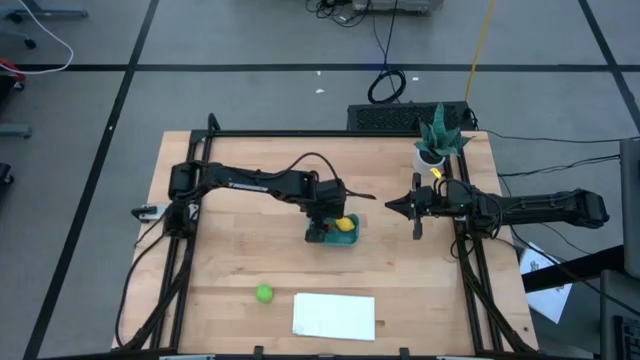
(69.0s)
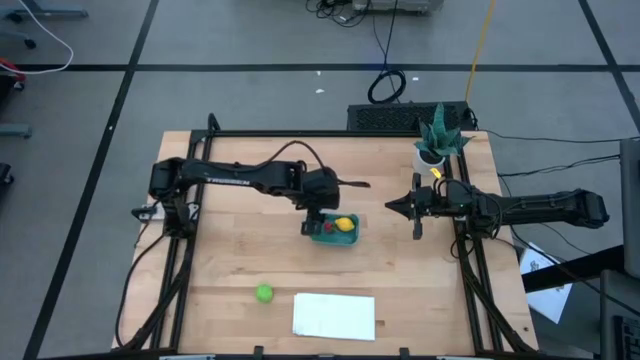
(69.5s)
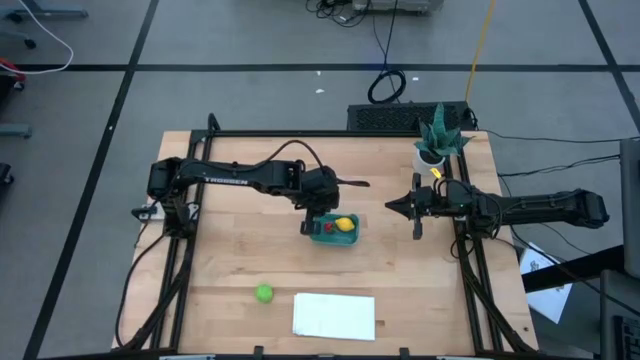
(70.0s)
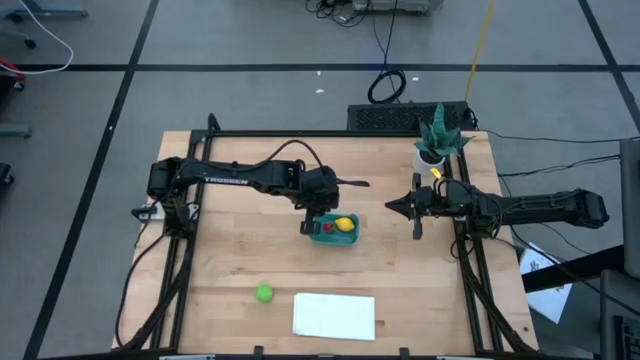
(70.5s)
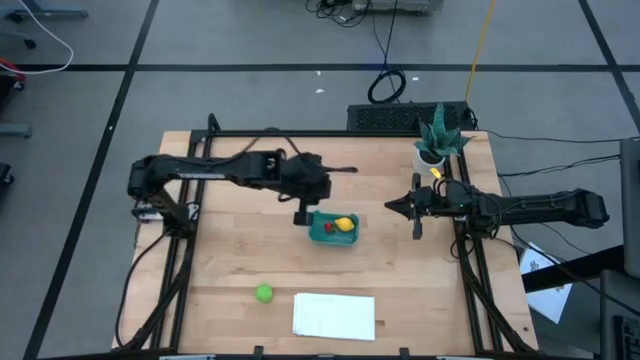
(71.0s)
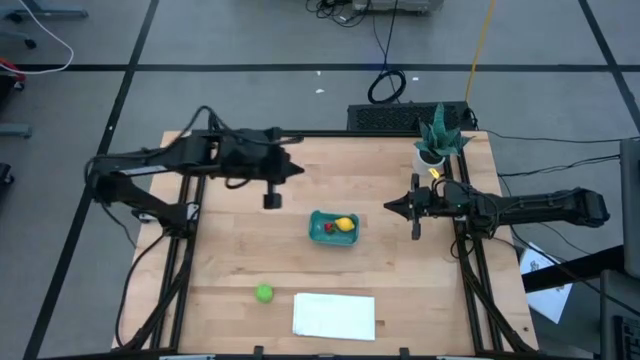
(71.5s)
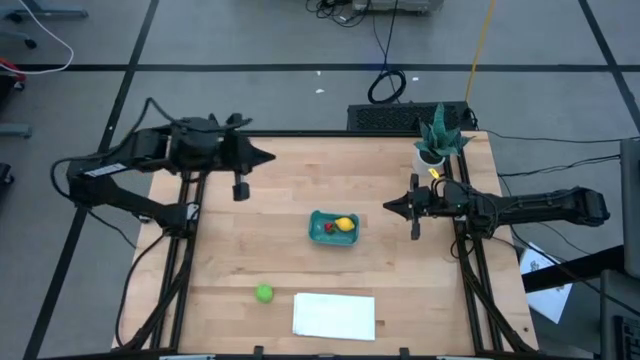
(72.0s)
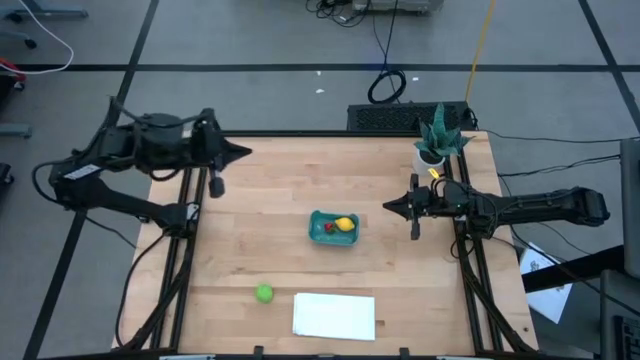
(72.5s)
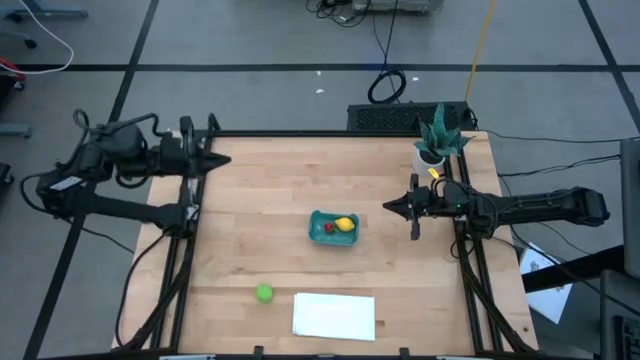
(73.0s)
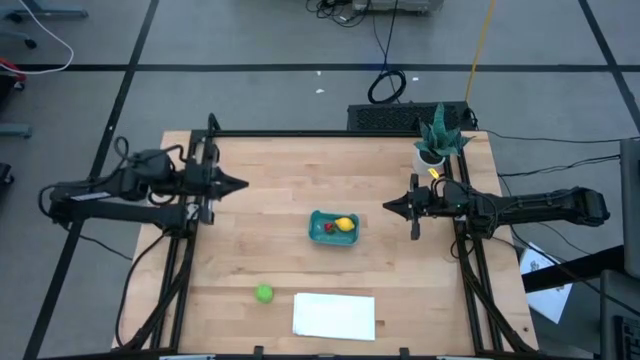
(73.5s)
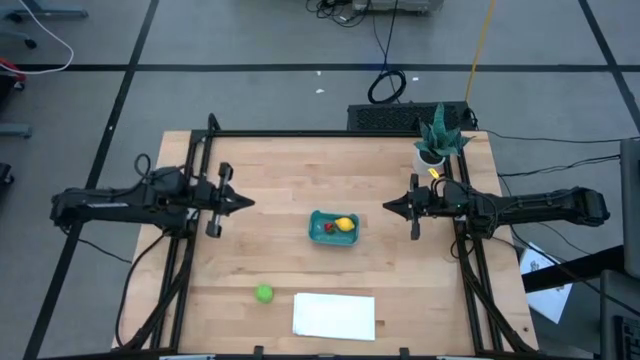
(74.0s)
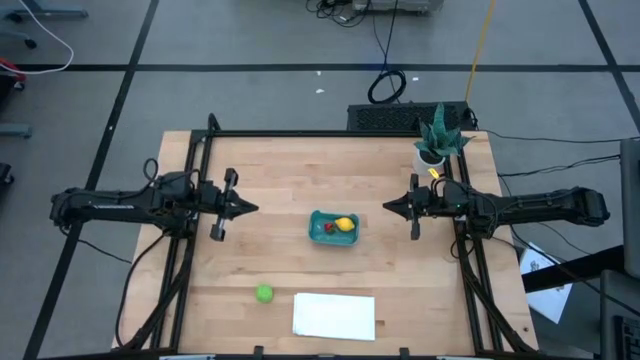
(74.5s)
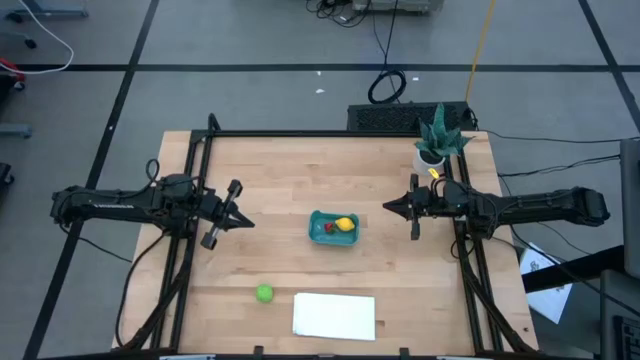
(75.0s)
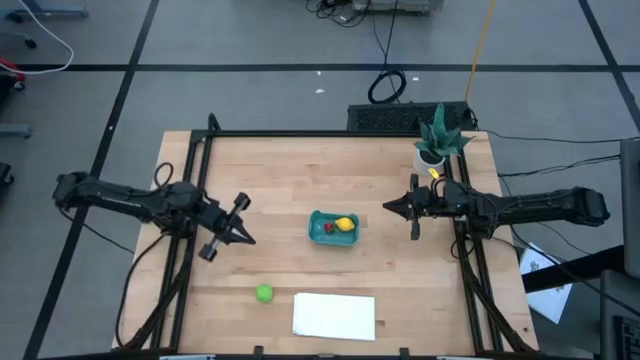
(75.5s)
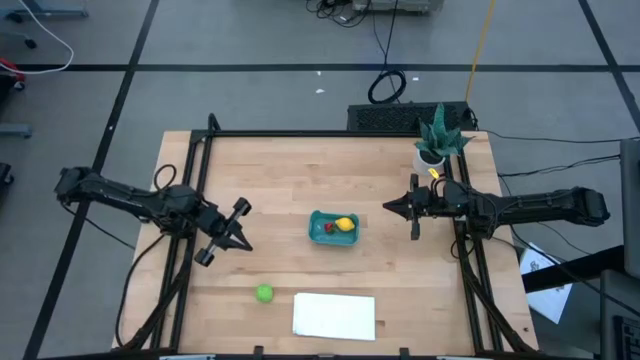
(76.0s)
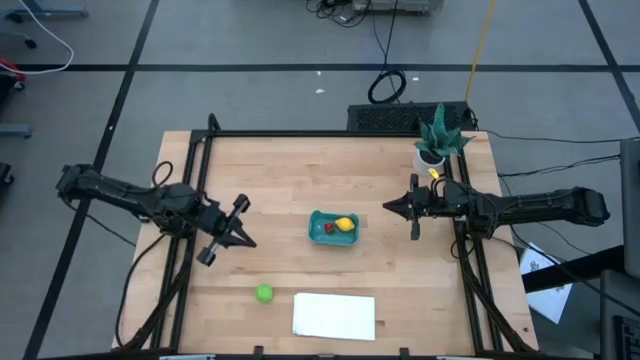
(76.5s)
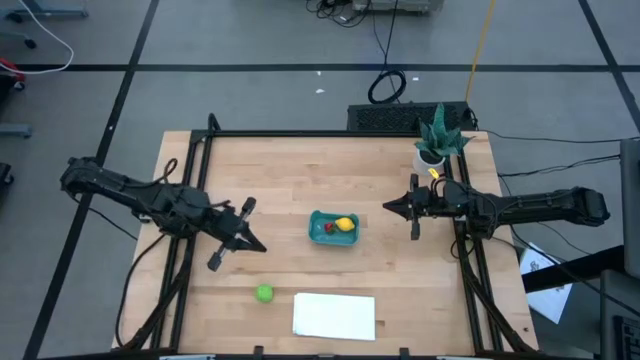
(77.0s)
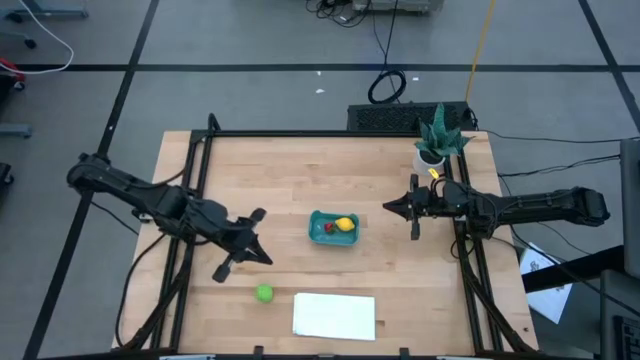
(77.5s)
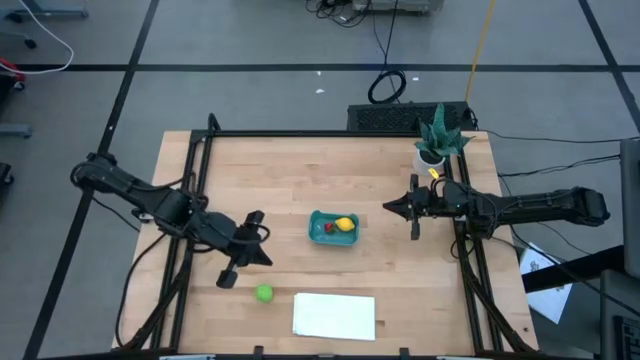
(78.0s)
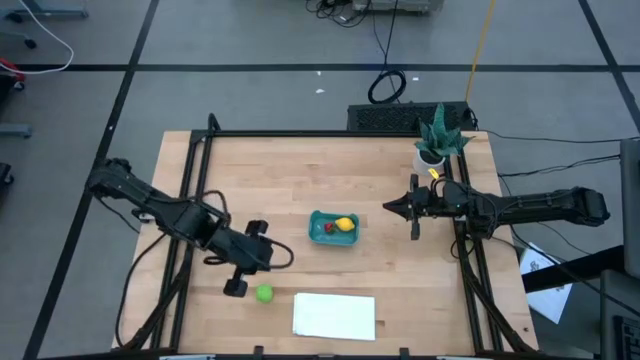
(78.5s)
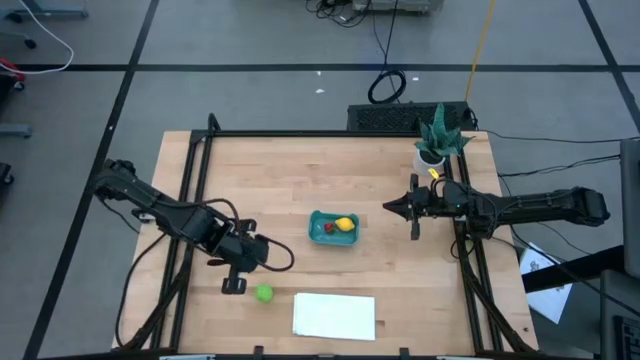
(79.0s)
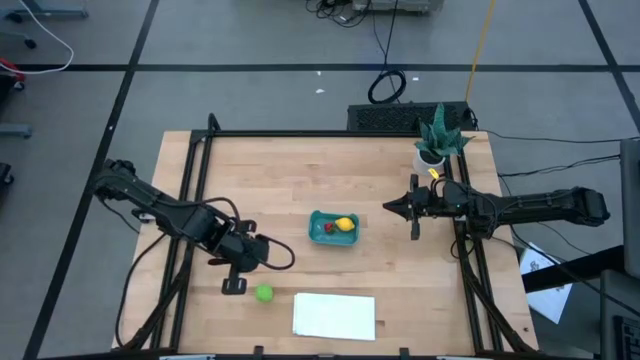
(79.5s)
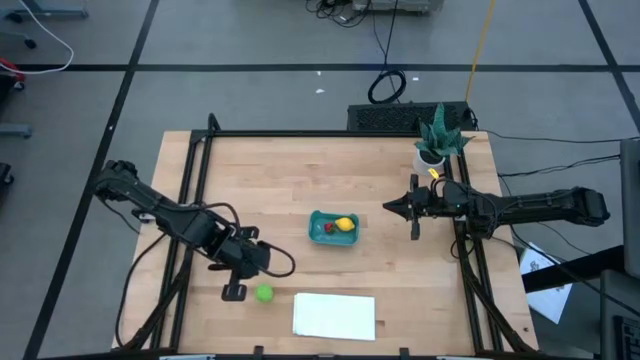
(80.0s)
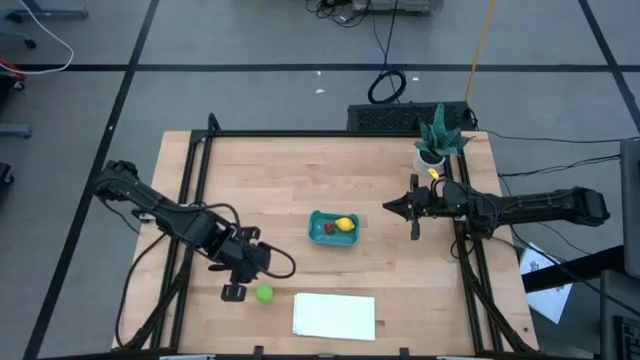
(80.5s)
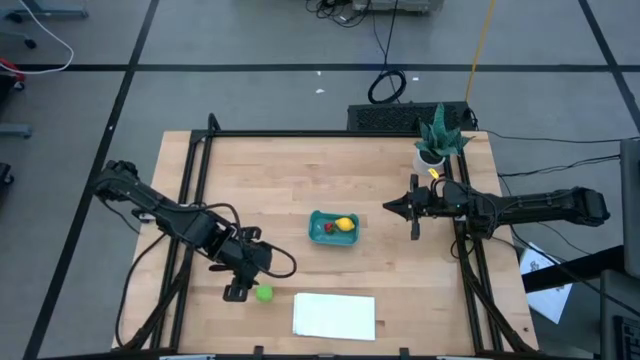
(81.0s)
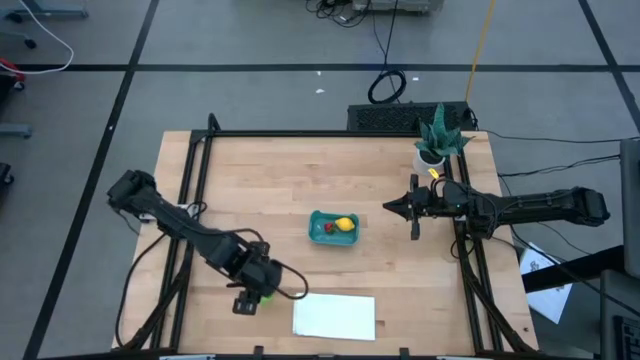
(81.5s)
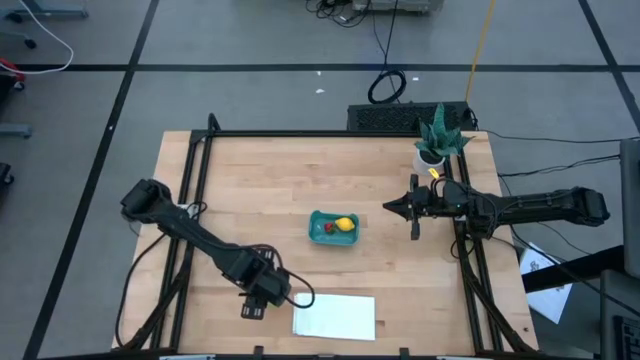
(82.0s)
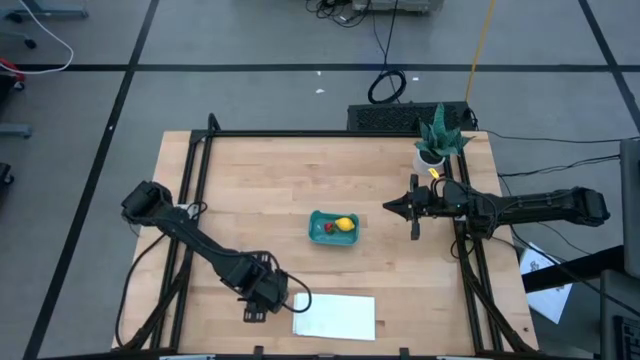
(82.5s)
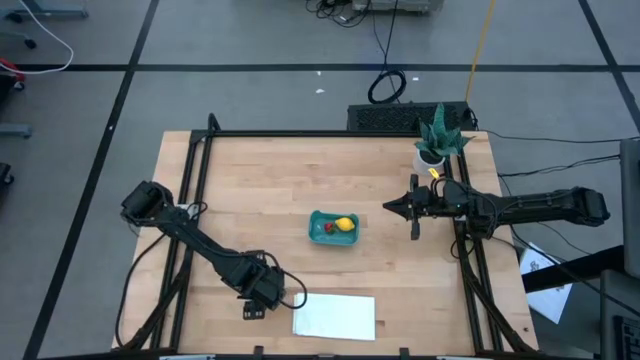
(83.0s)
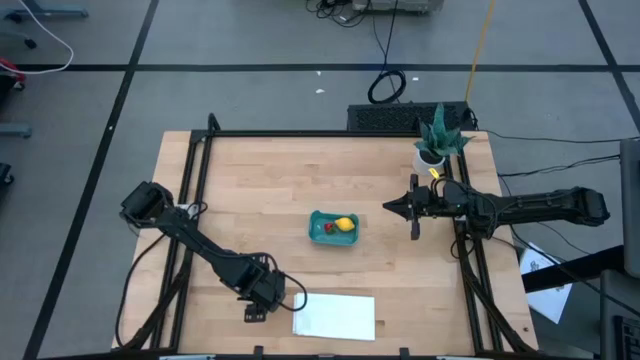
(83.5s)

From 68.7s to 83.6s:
Task: Pick and placing Produce into tupperware
Put the green cabbage into the blue bin

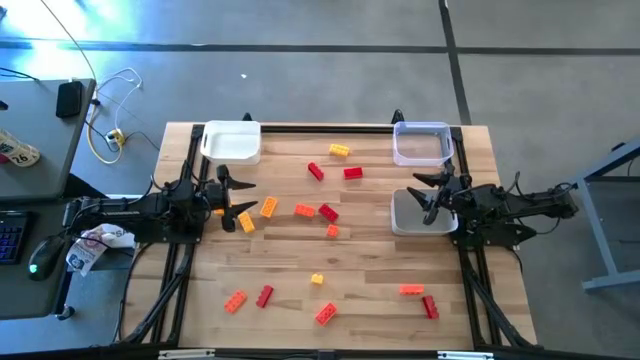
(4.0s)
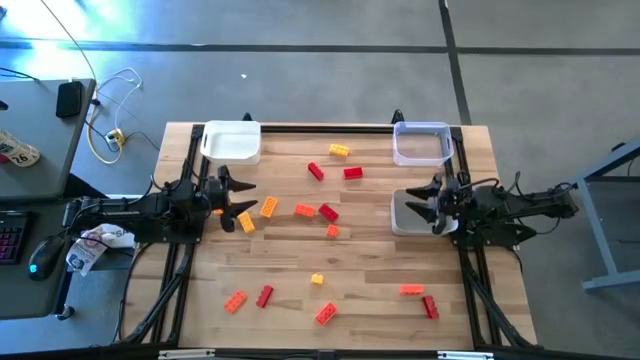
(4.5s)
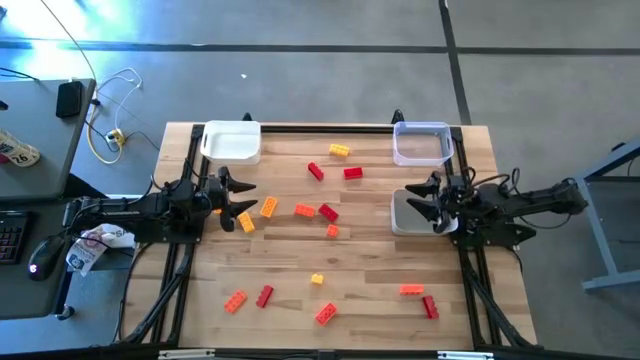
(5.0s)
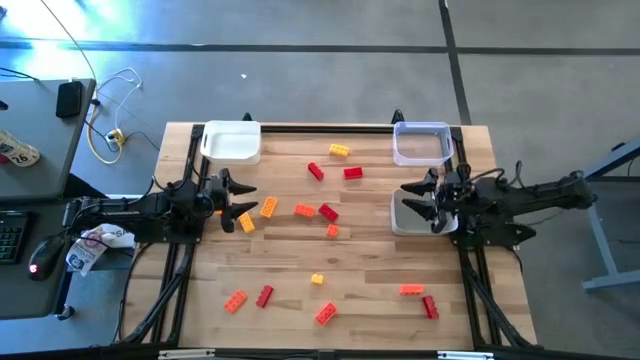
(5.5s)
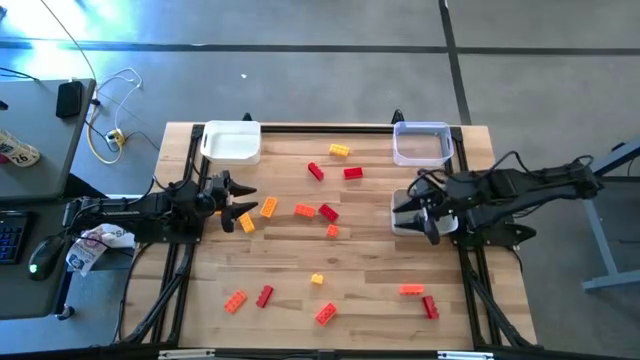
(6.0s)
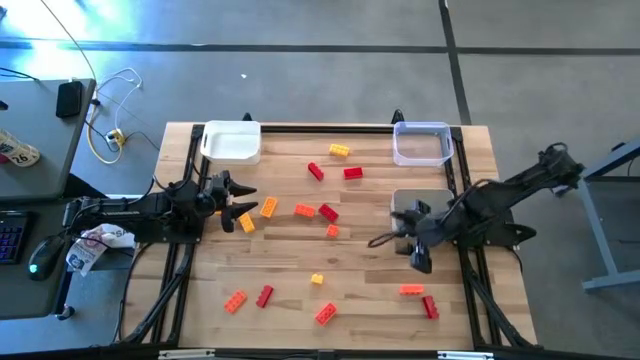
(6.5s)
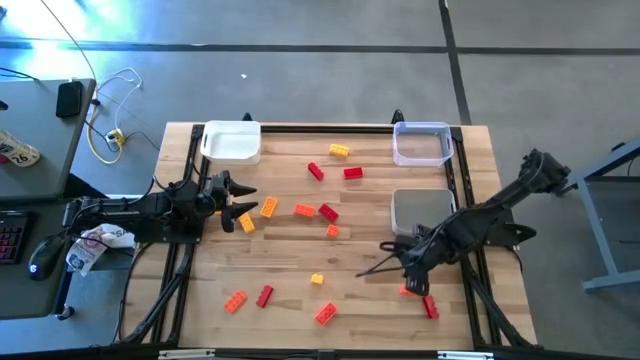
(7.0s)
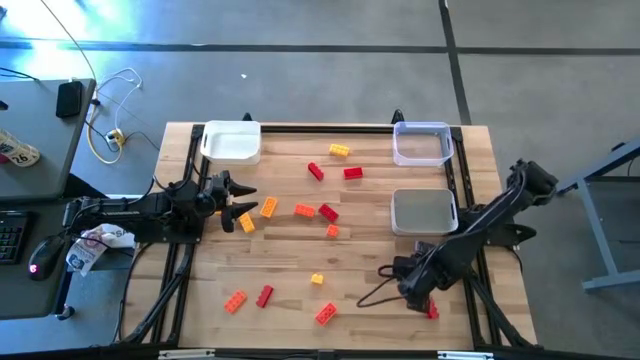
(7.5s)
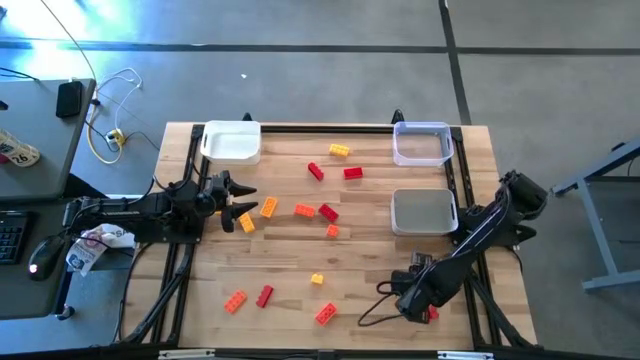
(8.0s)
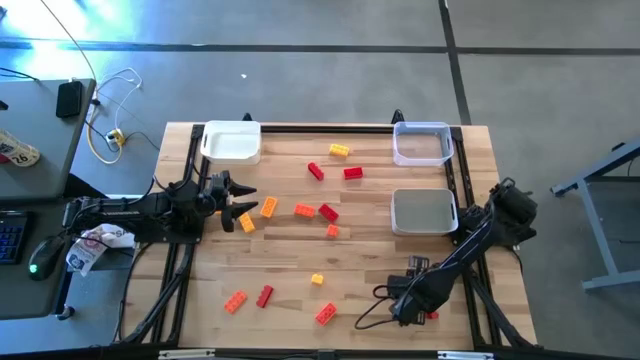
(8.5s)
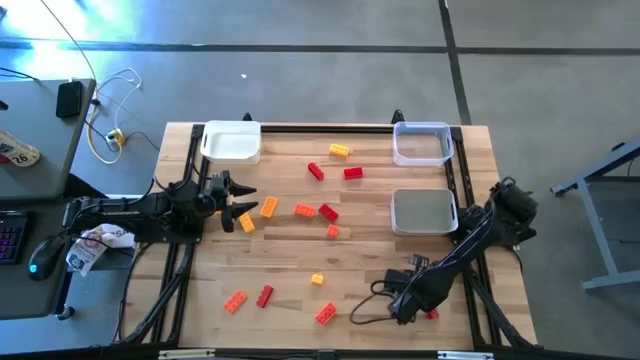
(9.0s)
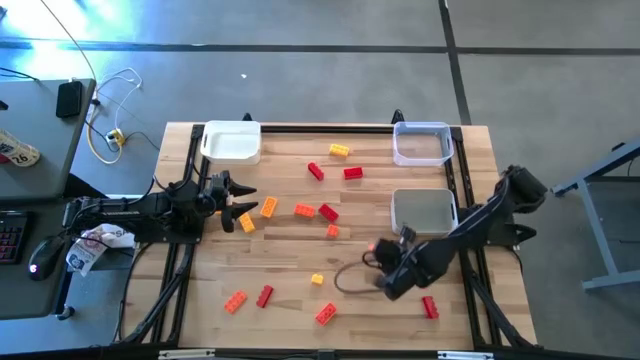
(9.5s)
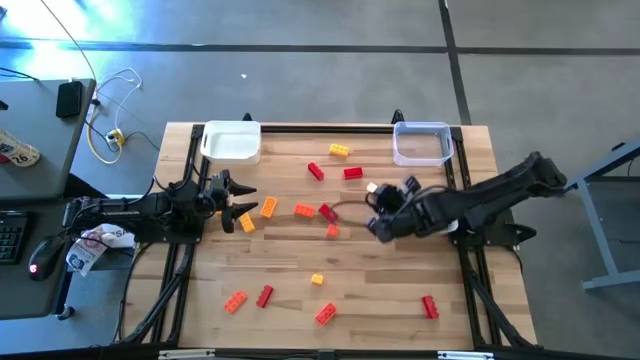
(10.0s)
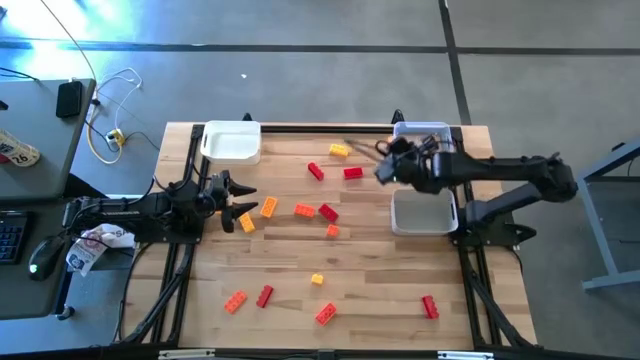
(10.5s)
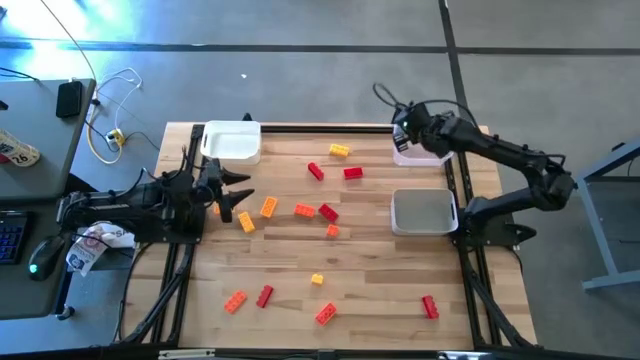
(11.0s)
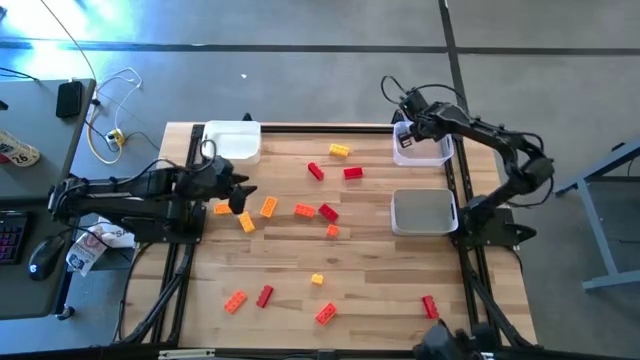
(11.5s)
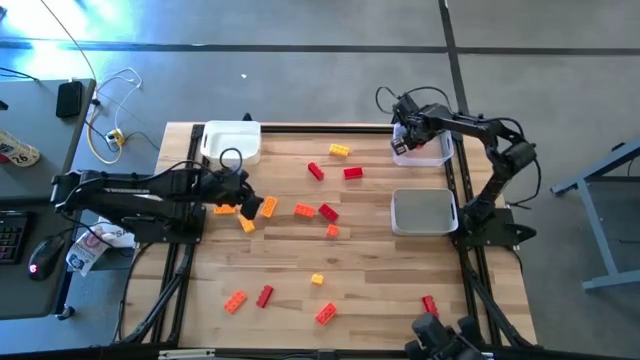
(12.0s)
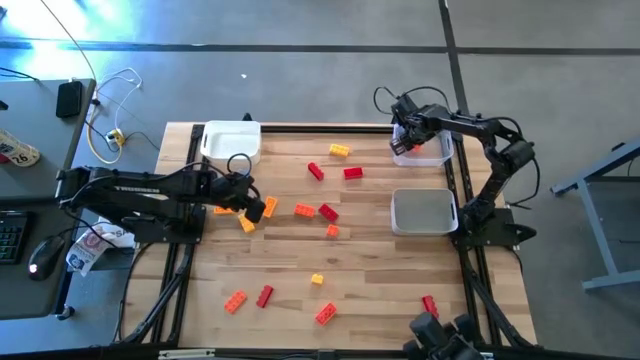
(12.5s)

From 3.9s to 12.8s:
Task: Sort & place blocks by color
Put the orange game piece into the transparent bin
